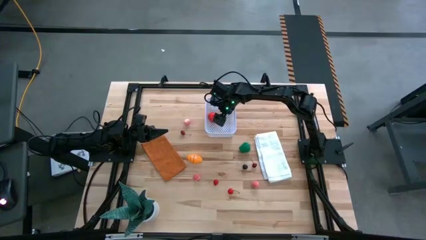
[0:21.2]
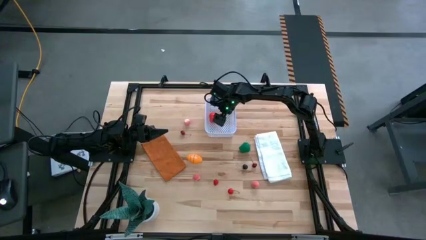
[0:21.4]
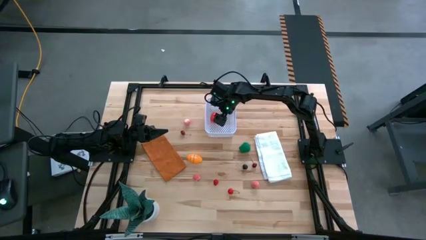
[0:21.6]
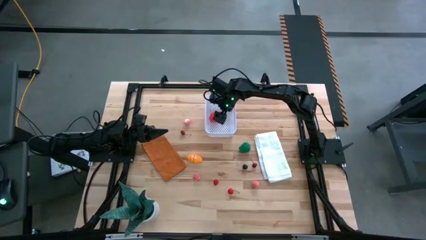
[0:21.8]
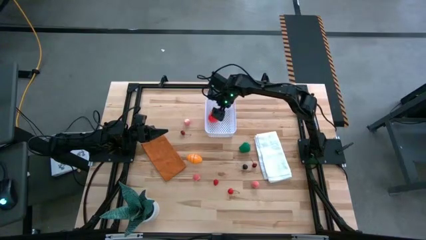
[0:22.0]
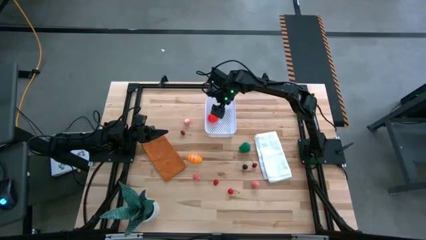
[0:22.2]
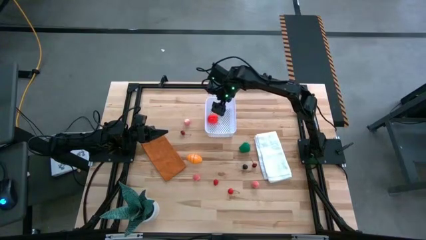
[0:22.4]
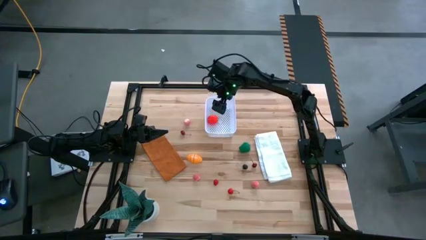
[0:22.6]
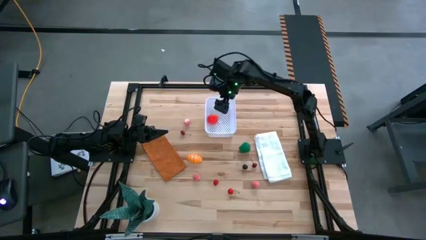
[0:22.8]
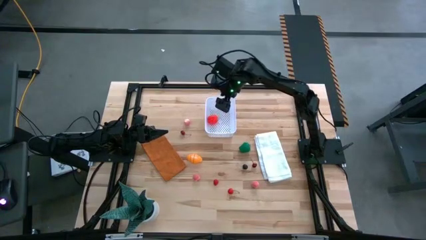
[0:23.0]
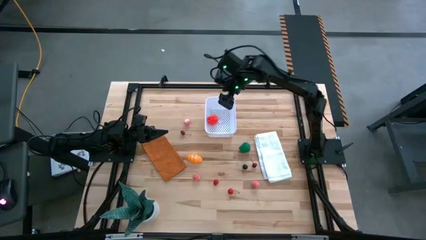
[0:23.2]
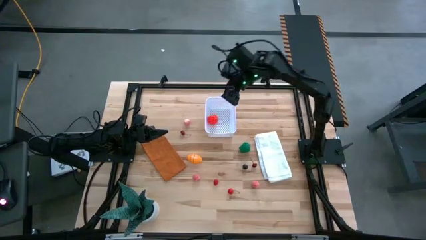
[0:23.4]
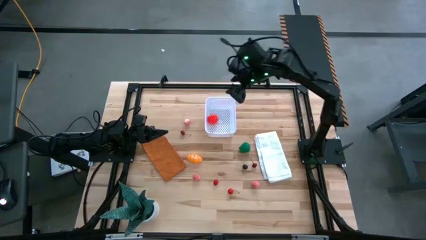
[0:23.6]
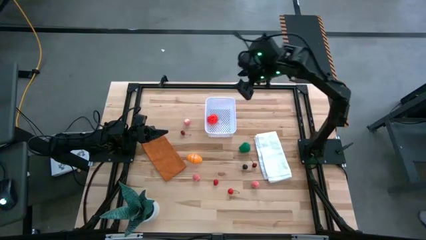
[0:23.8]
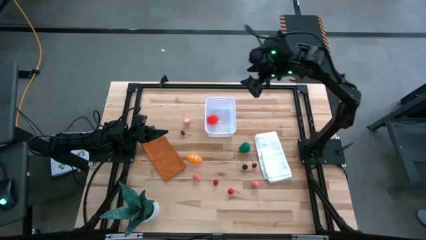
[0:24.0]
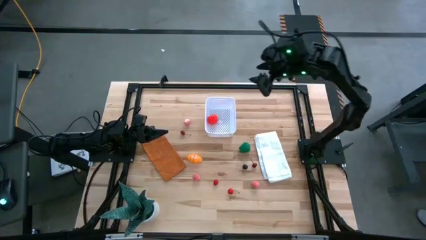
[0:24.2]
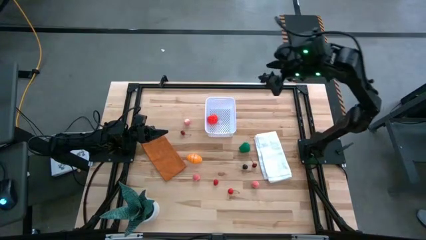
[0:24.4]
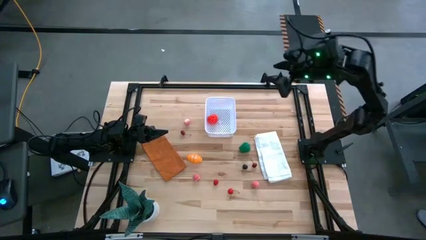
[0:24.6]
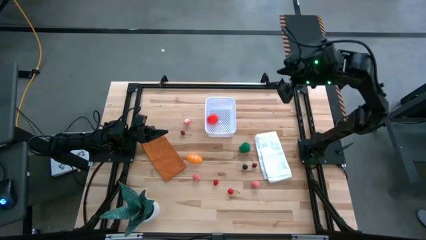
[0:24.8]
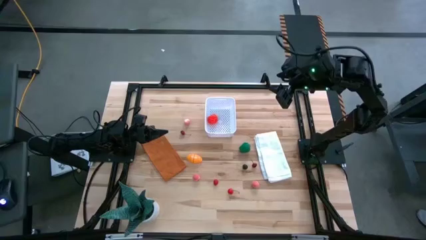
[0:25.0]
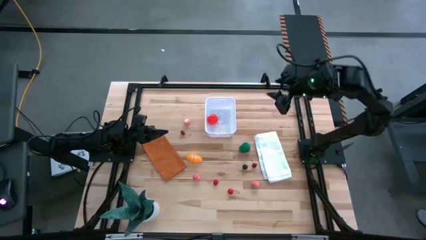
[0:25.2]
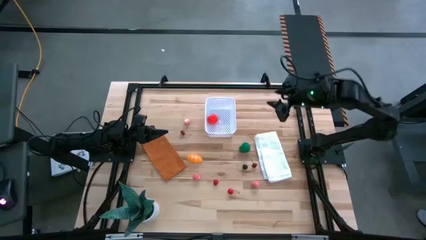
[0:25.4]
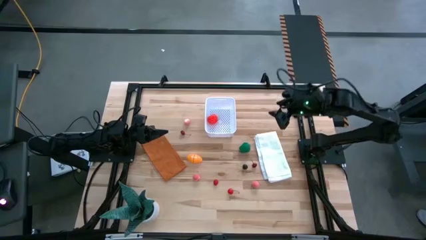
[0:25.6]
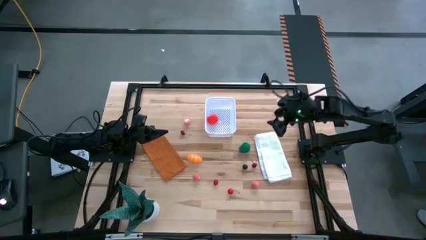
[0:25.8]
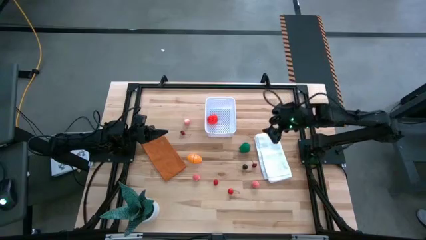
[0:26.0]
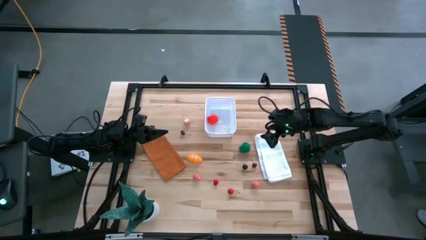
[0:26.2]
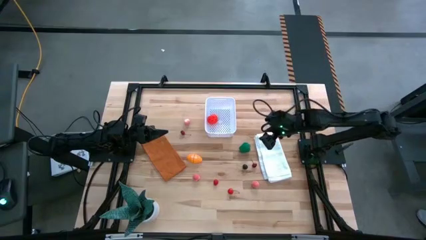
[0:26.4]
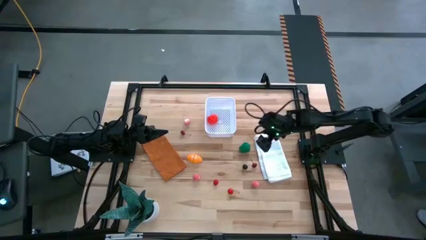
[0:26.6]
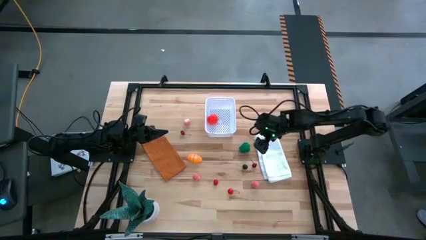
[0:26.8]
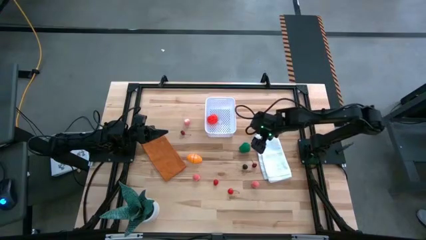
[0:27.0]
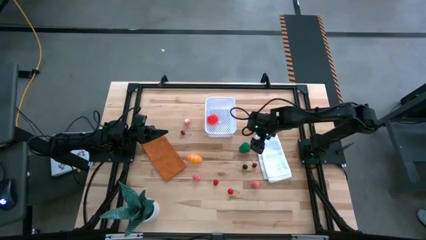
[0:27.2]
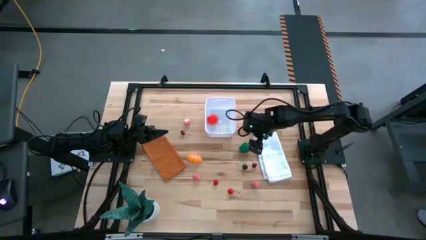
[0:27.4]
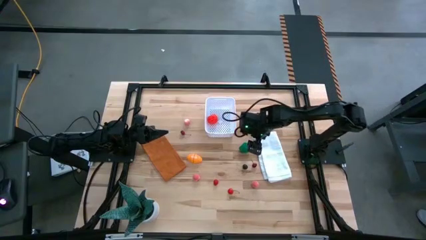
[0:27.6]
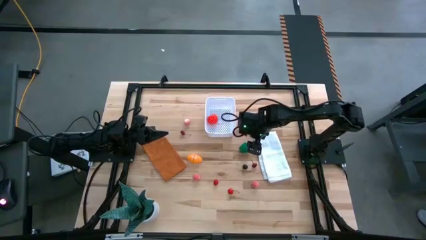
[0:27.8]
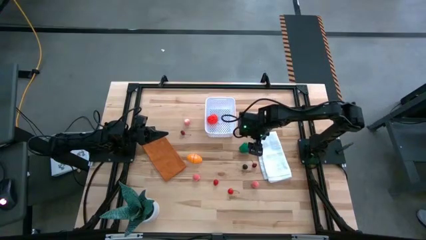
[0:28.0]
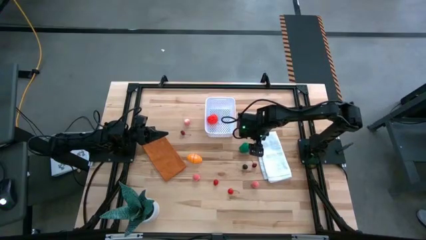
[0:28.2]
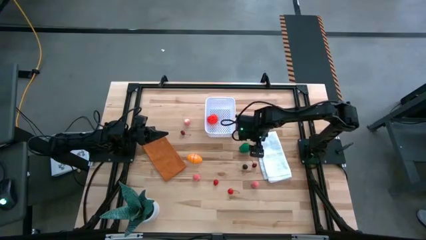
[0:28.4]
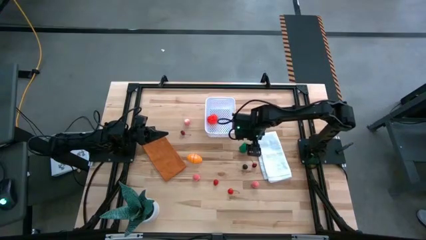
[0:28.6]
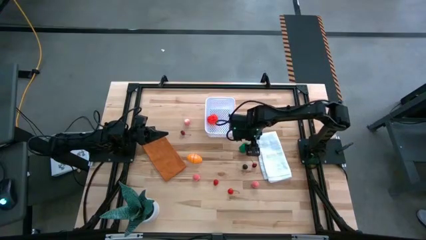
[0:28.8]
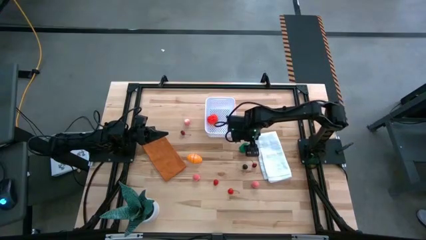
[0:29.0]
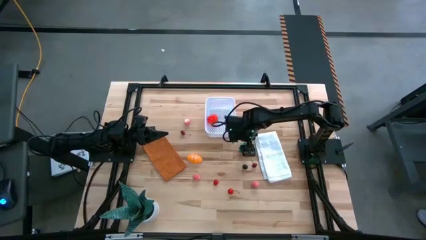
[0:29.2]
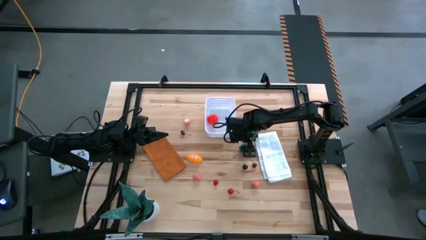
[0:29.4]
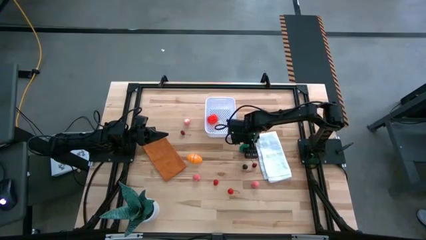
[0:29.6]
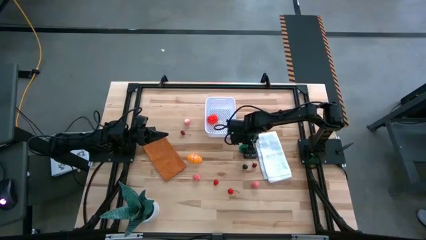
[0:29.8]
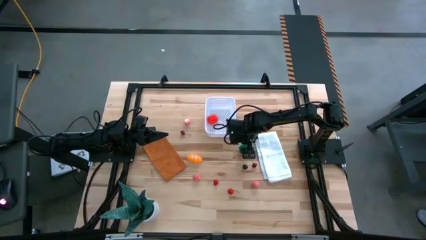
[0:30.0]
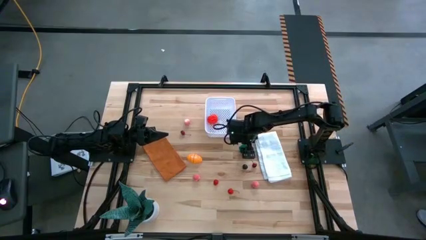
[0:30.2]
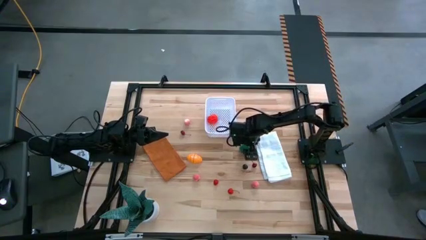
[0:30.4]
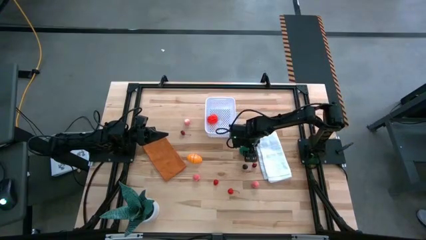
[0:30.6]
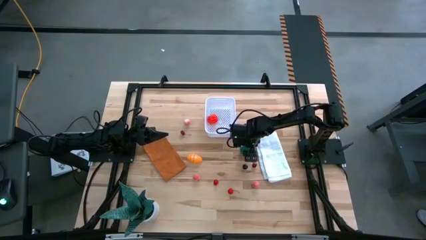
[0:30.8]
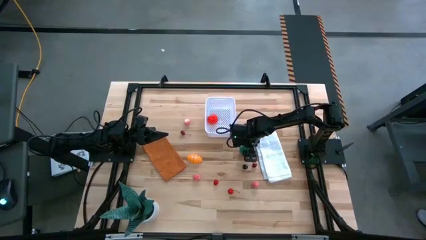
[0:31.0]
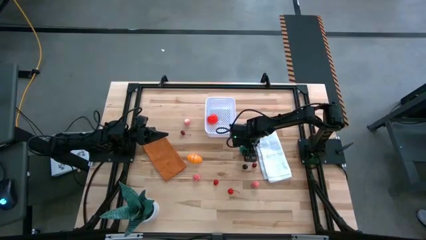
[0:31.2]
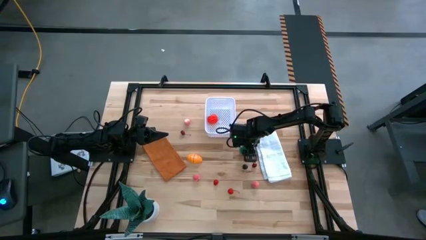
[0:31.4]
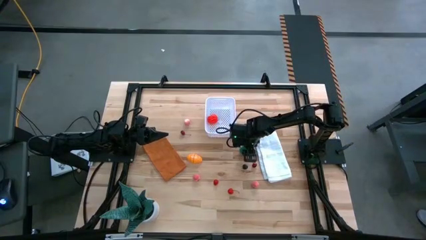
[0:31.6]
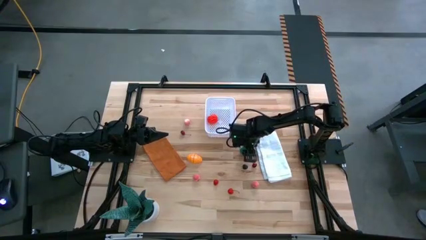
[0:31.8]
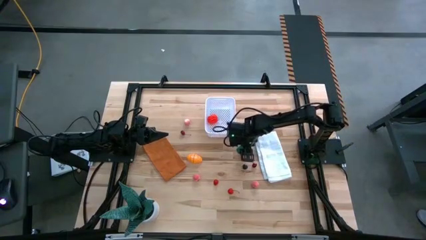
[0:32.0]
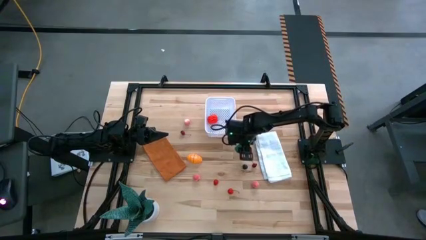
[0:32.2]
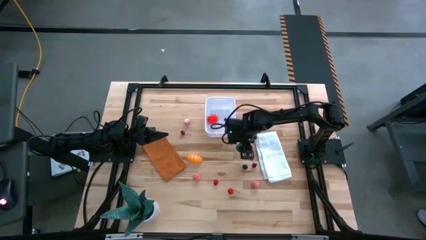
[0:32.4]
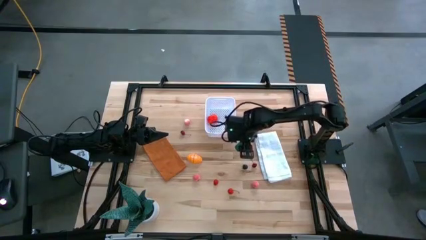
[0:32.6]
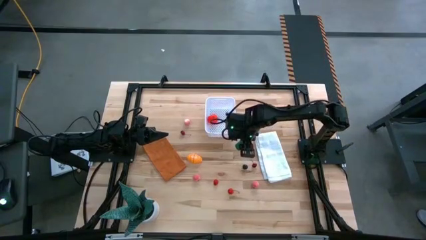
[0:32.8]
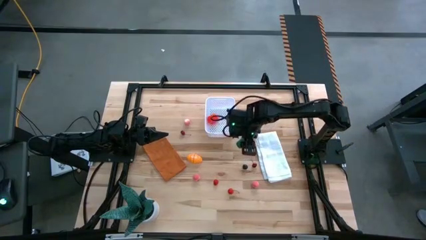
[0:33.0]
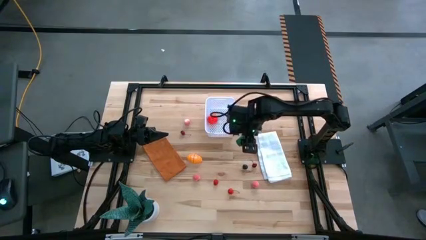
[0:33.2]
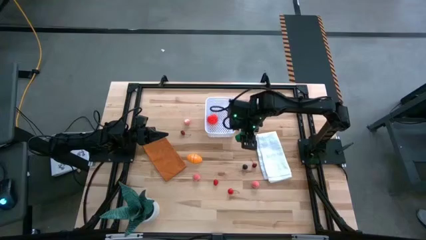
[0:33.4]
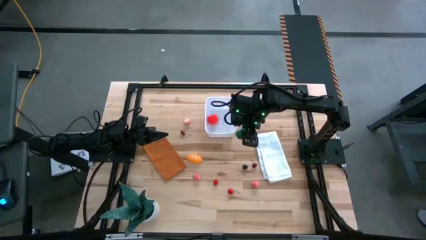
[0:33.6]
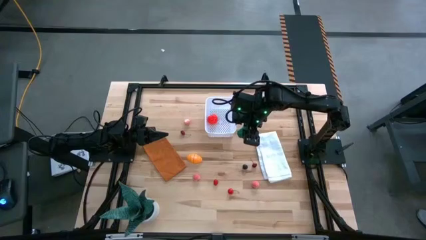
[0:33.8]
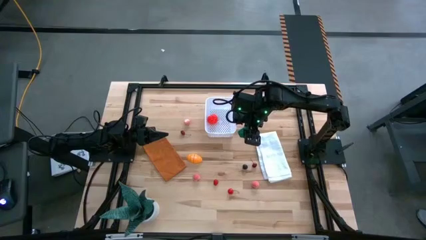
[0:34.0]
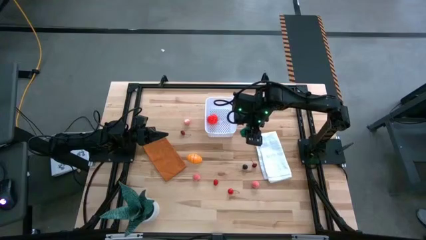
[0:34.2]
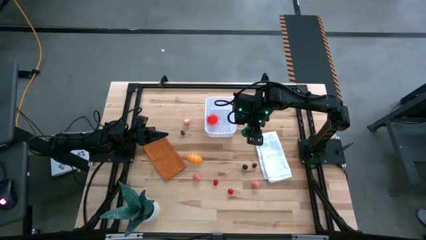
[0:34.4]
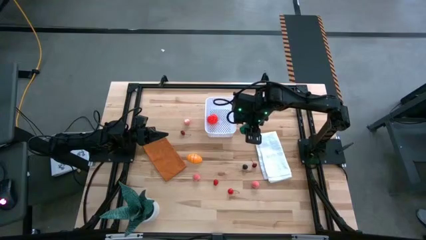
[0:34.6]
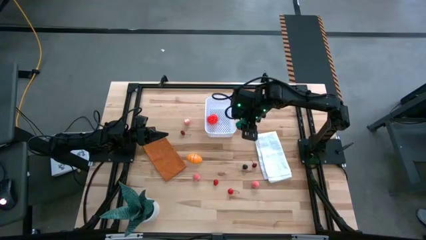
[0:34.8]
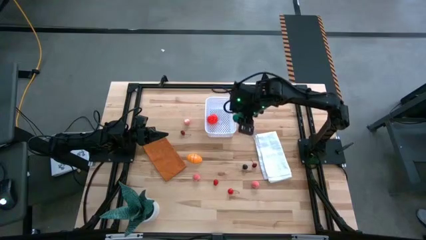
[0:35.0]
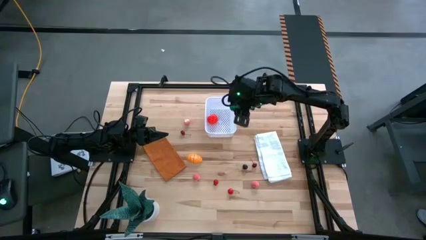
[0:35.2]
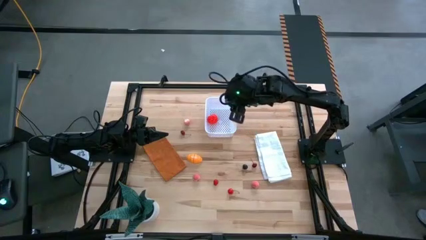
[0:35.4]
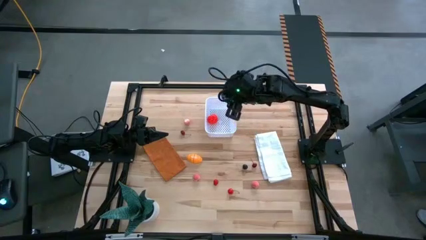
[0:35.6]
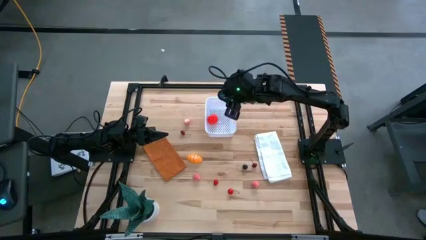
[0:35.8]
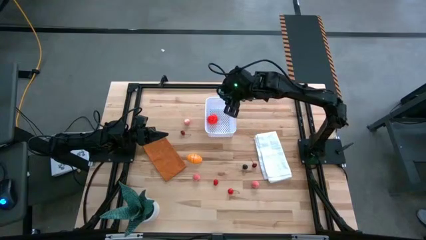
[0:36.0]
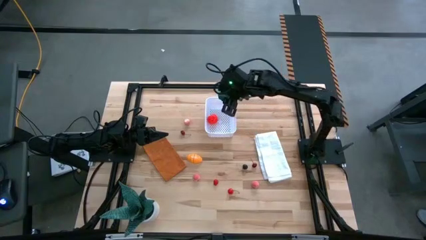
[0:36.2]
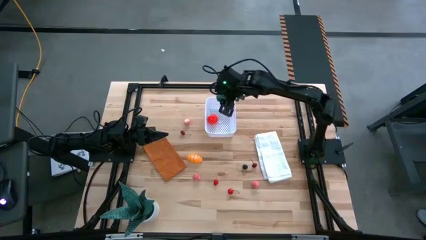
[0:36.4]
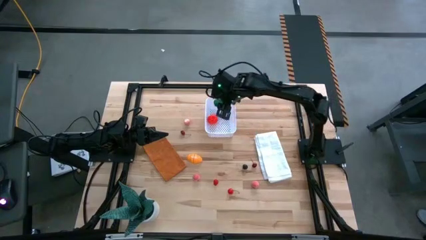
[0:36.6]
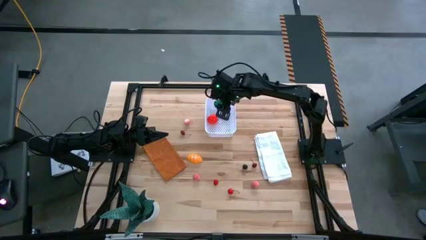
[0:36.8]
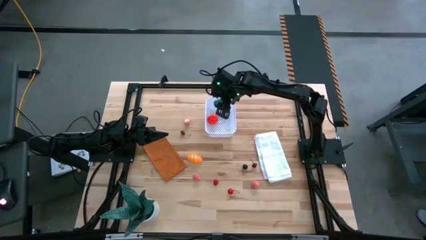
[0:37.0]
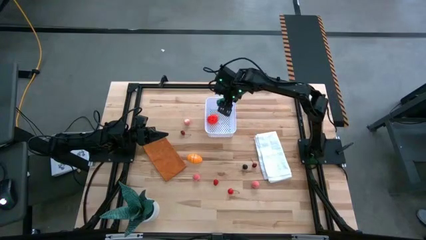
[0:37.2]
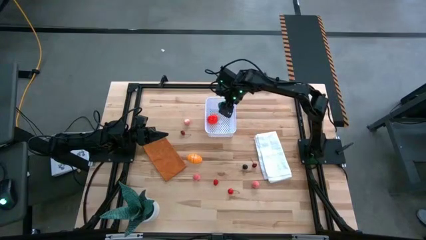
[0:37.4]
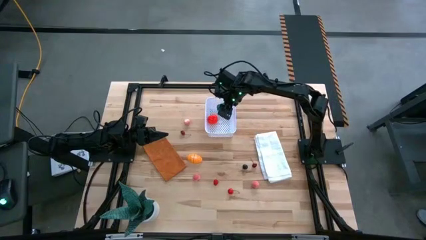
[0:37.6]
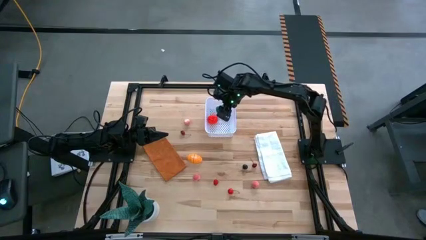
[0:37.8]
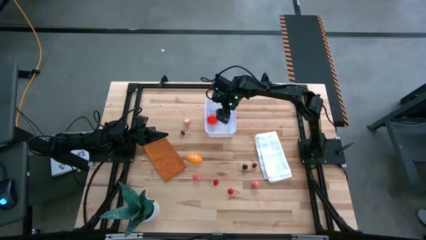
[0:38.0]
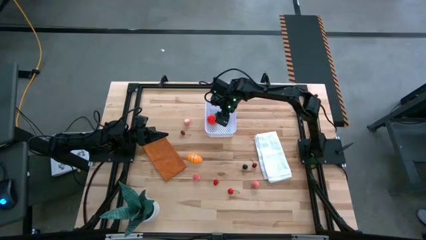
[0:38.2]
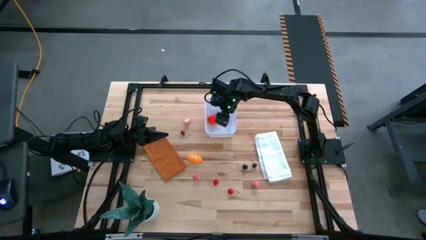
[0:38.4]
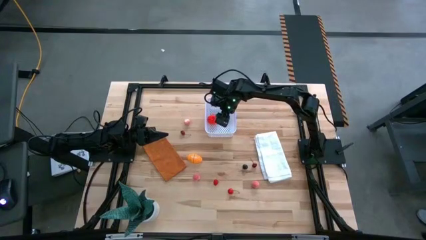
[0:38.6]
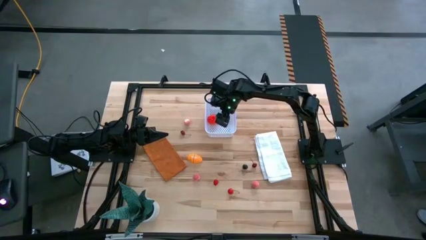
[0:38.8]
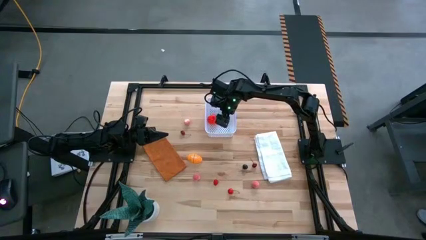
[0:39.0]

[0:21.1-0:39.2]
Task: Pick and placing Produce into tupperware
Put the bell pepper into the white bin
